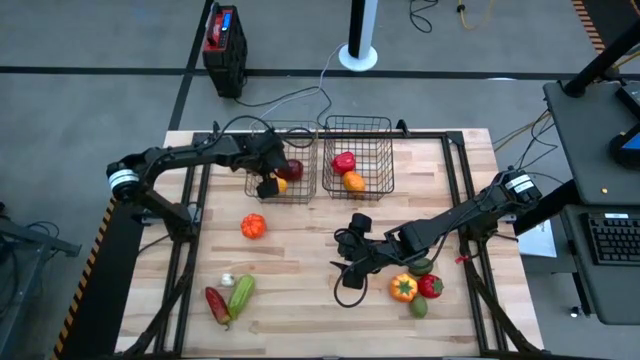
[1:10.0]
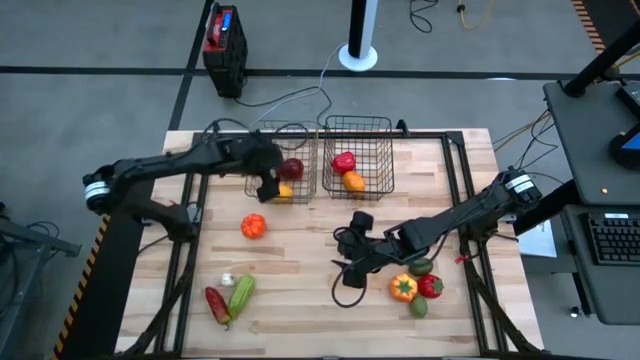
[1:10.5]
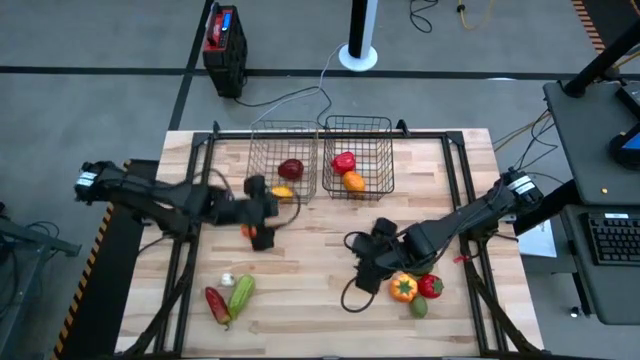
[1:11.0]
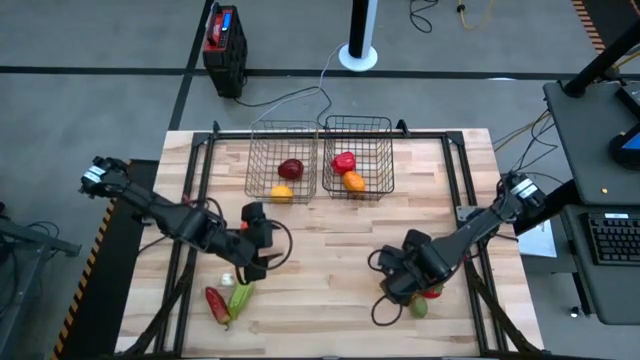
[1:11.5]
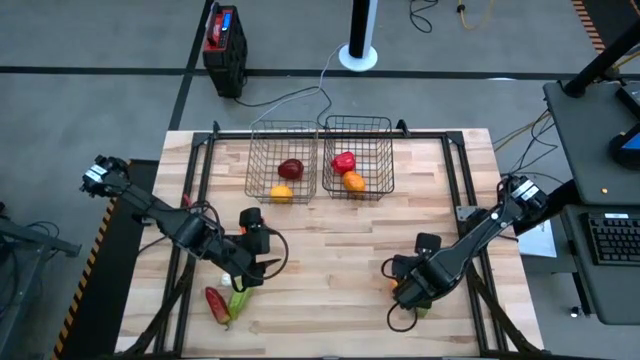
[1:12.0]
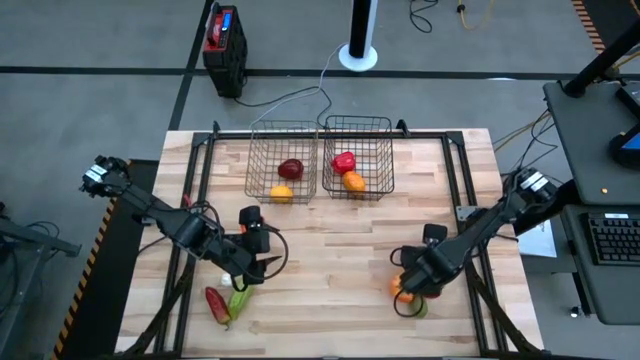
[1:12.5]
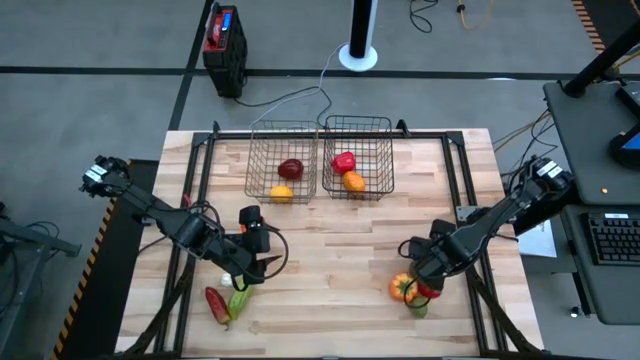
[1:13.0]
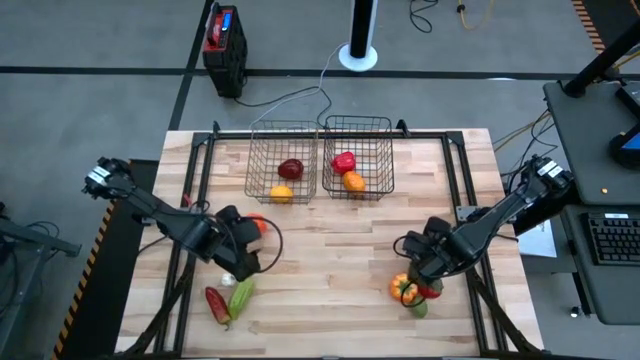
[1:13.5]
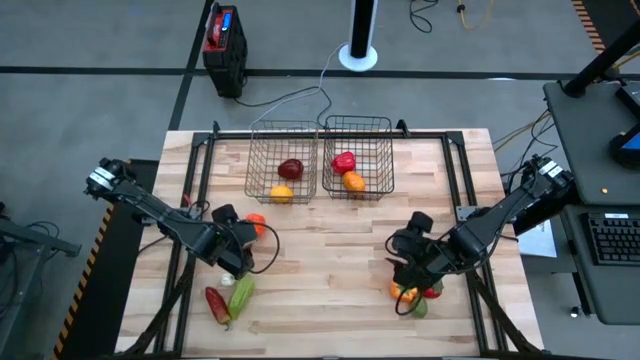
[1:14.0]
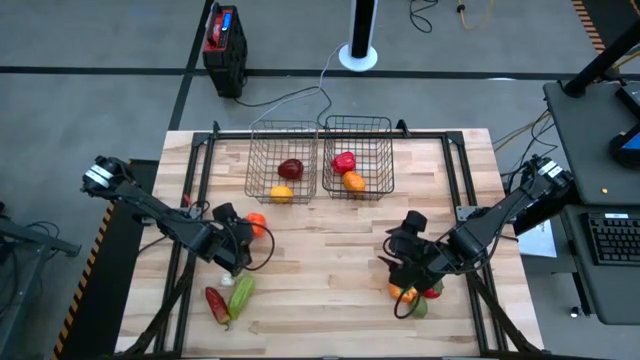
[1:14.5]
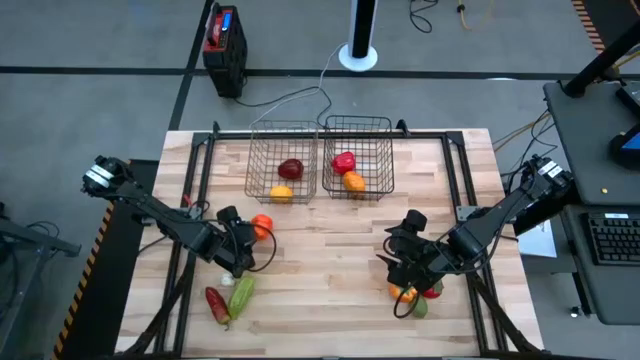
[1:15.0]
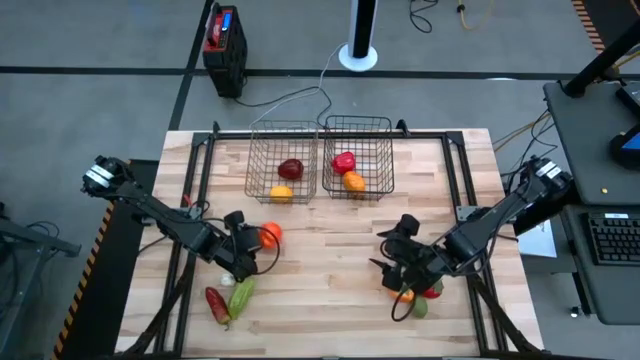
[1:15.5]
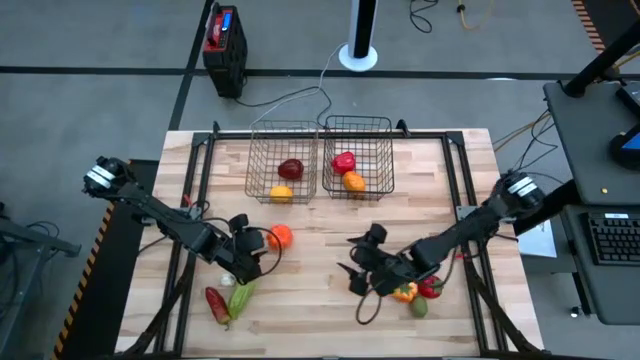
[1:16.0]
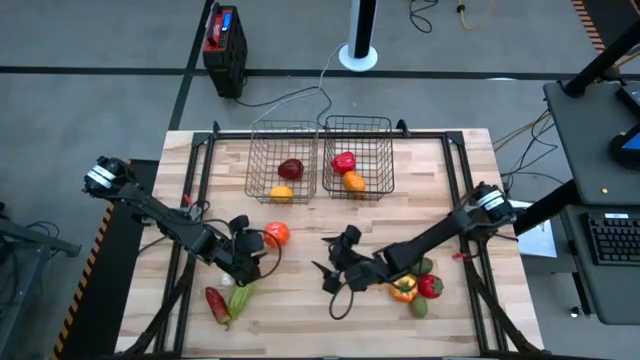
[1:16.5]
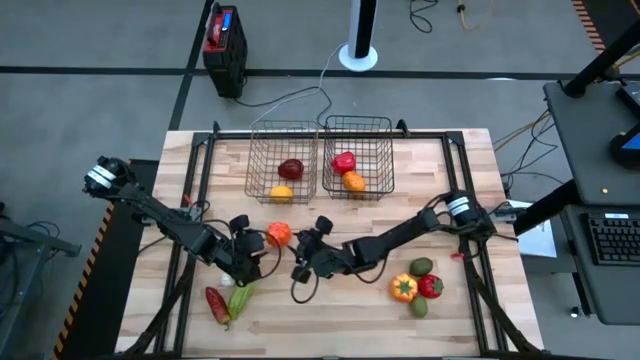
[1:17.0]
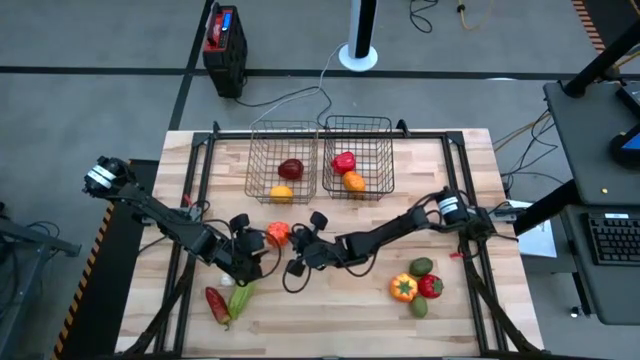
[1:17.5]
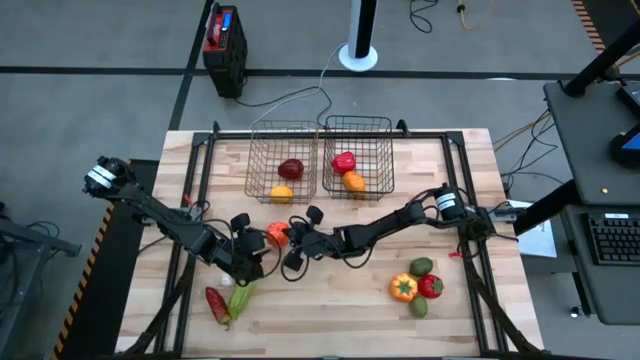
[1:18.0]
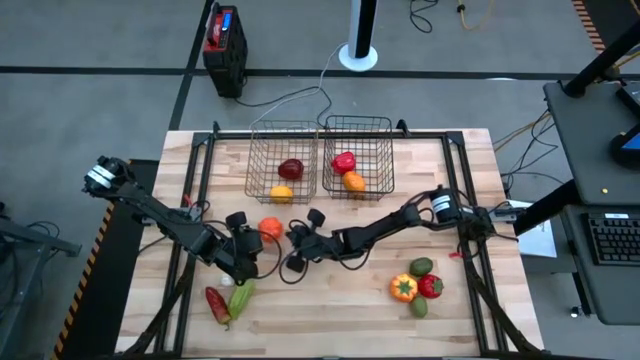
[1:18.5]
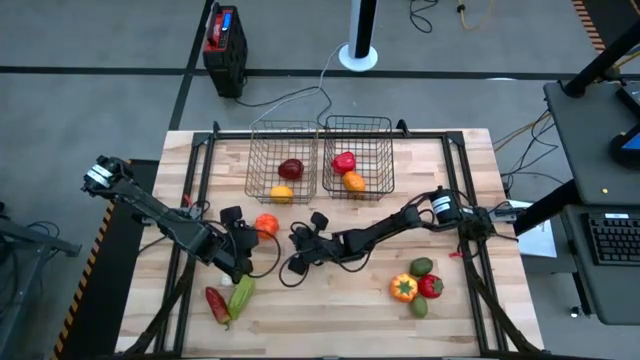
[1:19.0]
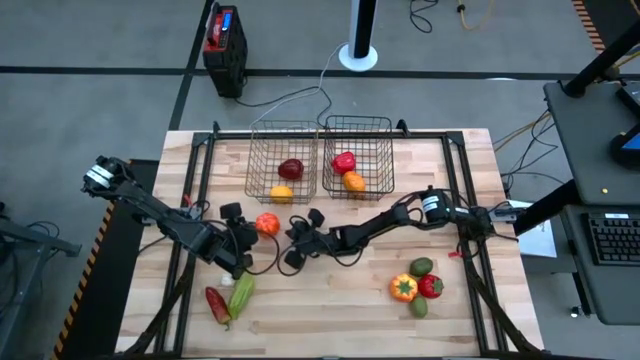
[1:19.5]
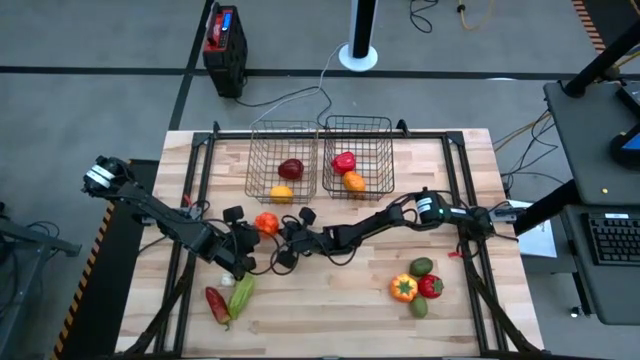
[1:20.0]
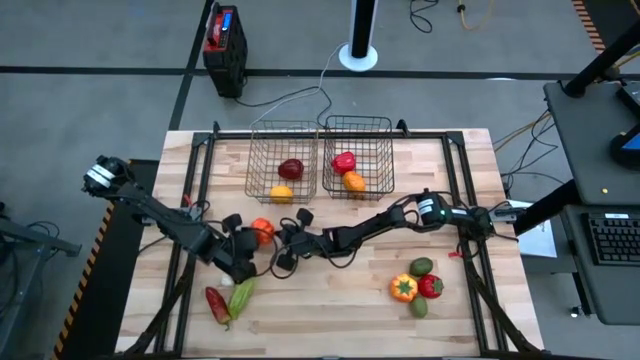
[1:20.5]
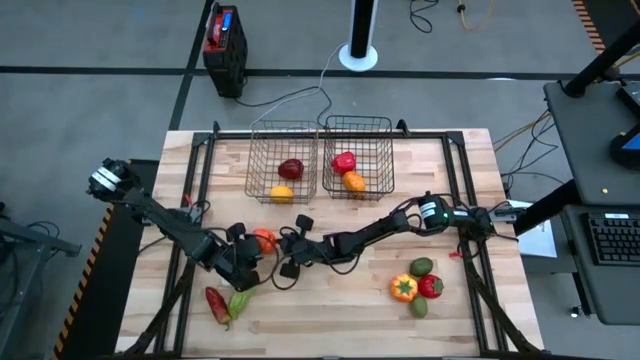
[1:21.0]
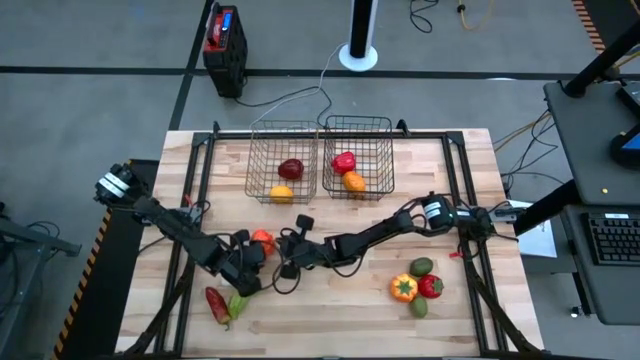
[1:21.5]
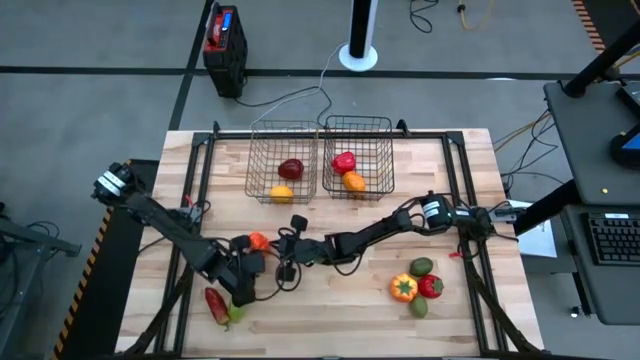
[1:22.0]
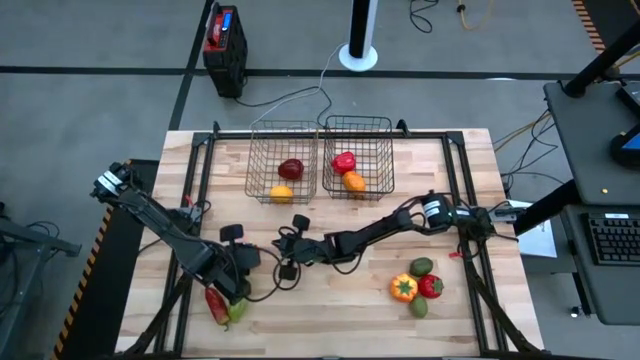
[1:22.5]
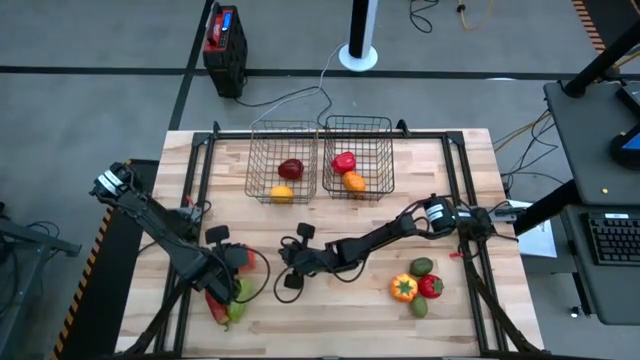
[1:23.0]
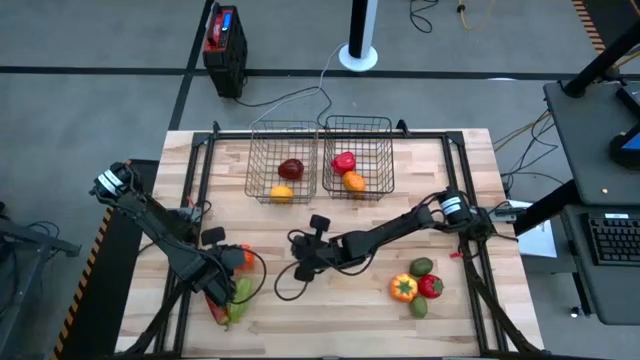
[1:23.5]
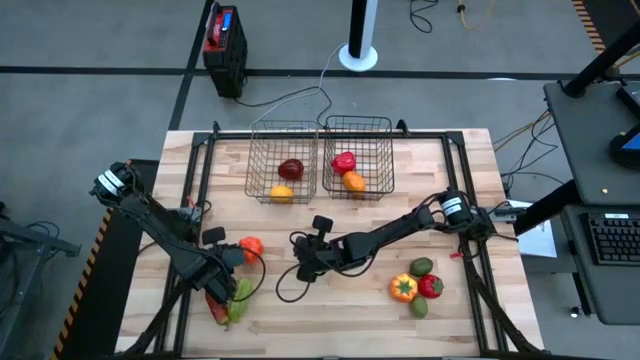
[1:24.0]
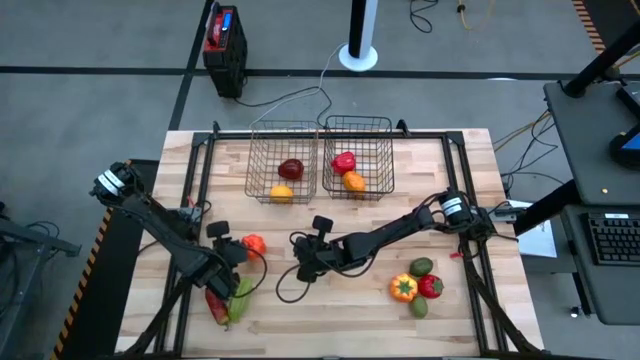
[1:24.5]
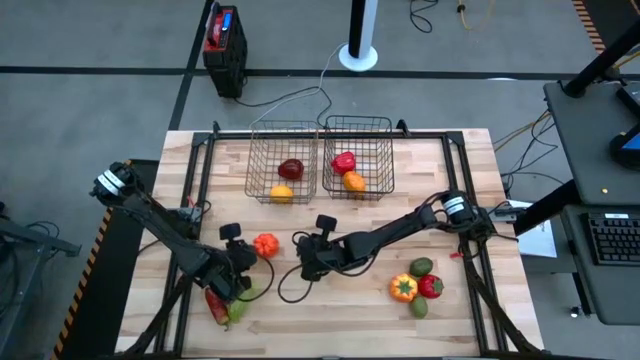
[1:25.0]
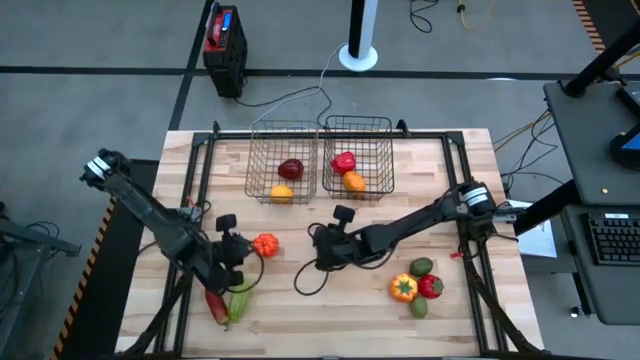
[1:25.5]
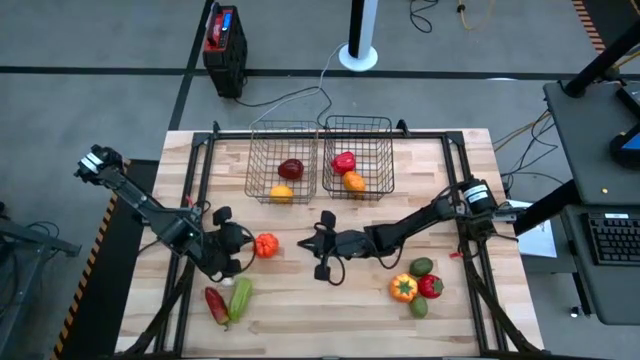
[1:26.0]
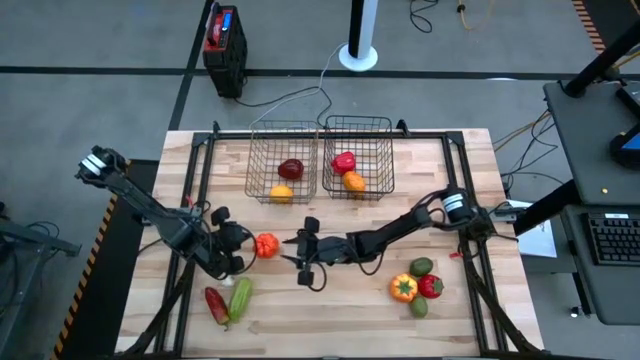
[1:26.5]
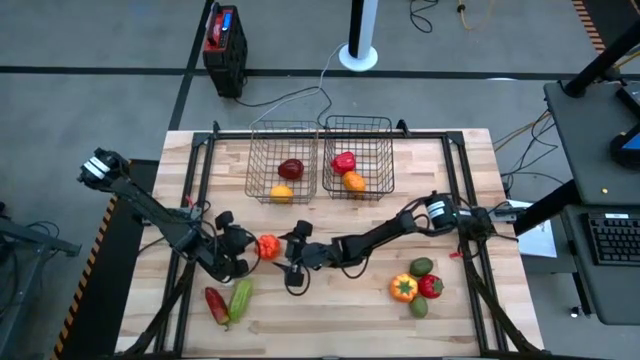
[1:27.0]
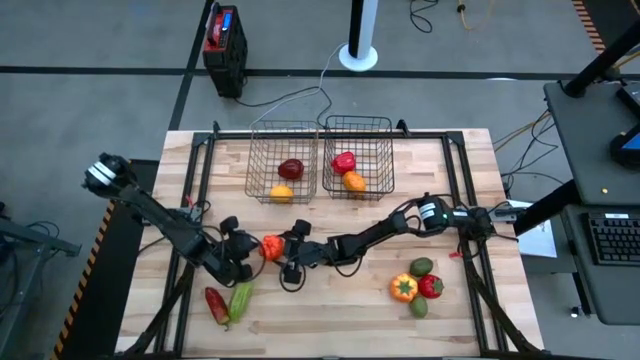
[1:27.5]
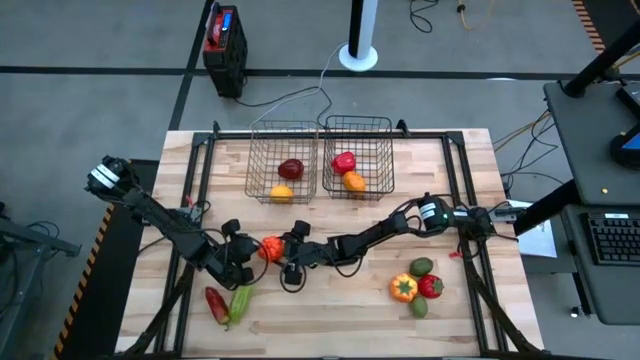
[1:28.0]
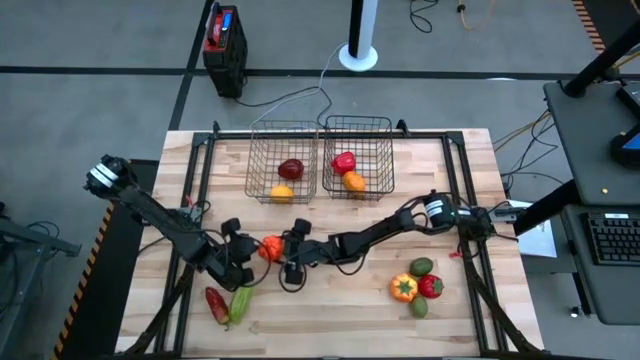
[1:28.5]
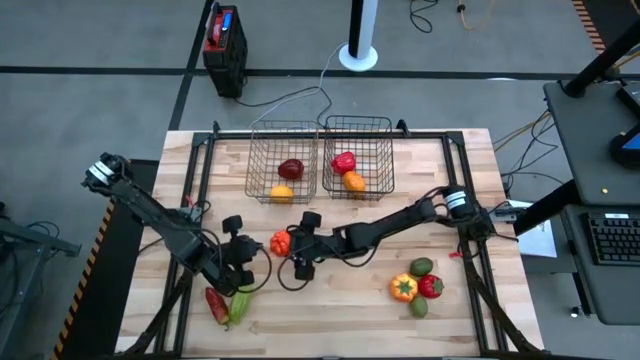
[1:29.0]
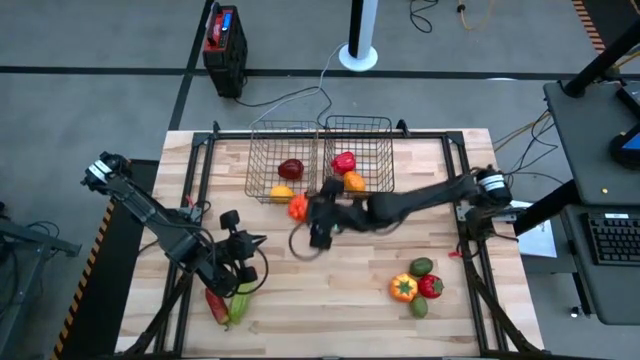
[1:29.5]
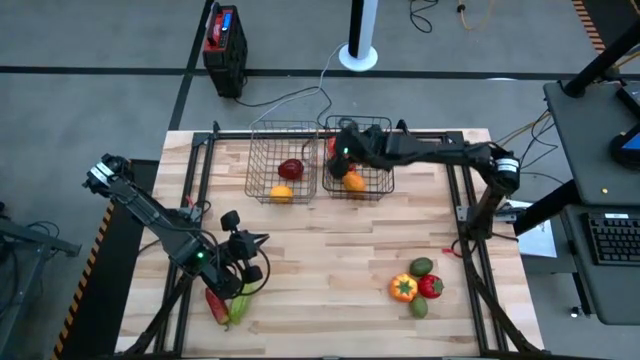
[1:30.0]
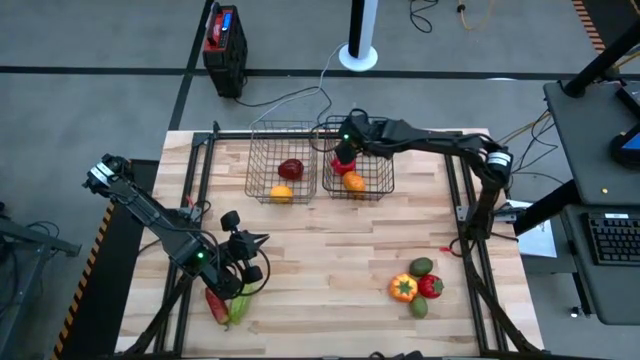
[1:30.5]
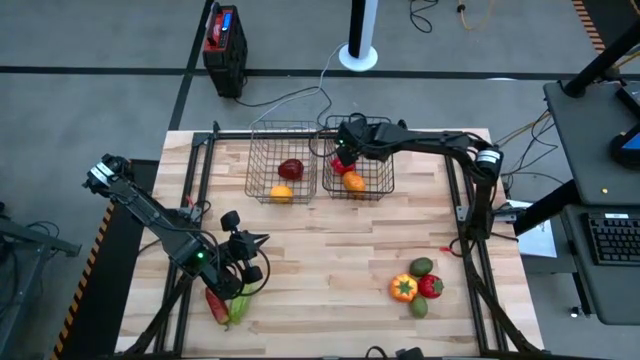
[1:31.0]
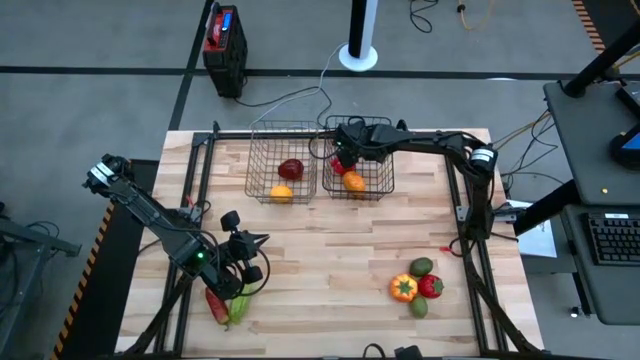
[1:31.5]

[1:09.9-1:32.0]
Task: Sort produce into baskets
Put the orange pumpkin into the black wire basket
